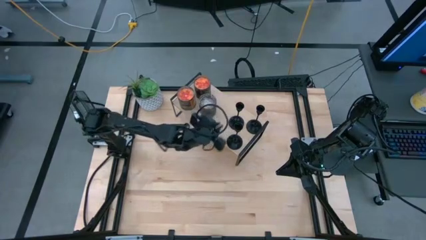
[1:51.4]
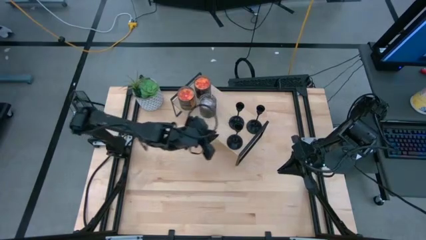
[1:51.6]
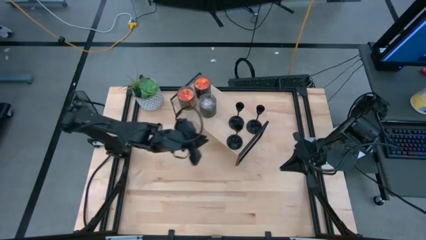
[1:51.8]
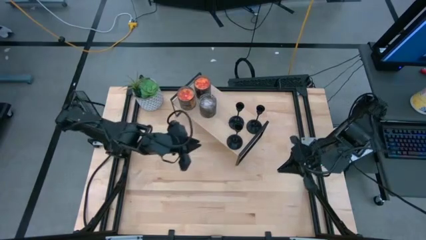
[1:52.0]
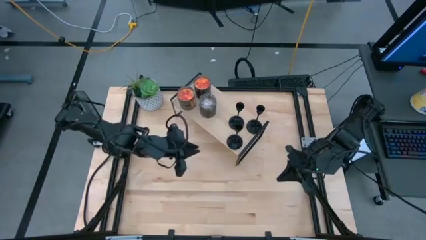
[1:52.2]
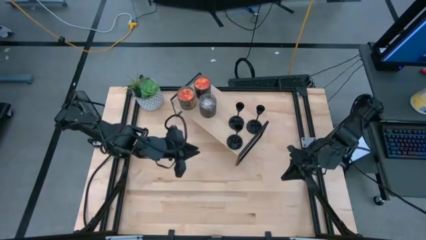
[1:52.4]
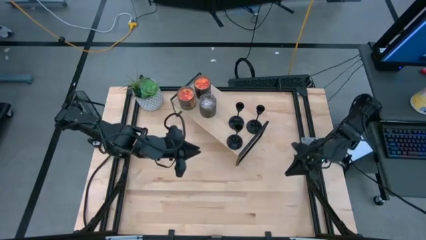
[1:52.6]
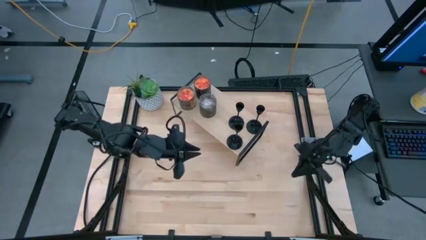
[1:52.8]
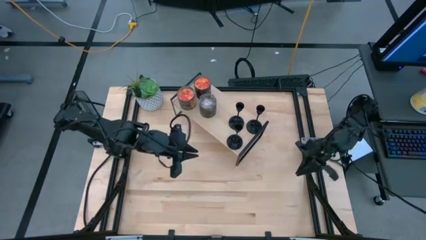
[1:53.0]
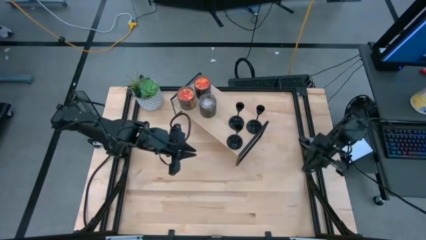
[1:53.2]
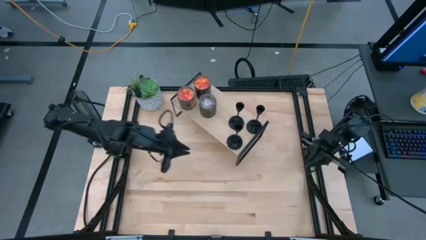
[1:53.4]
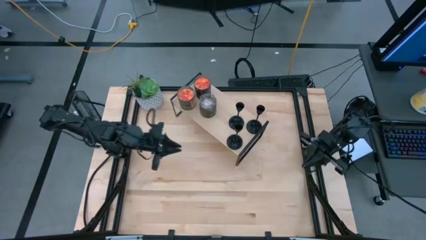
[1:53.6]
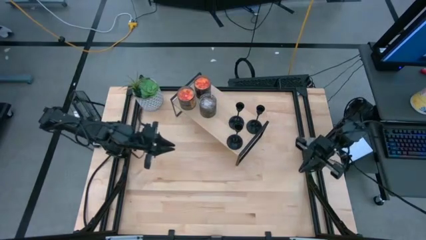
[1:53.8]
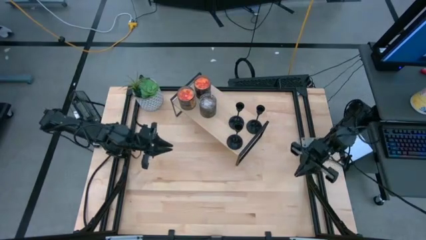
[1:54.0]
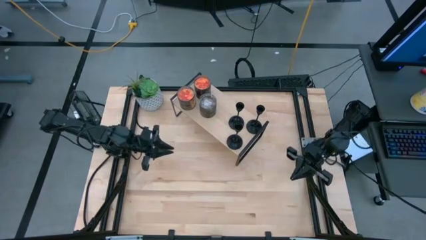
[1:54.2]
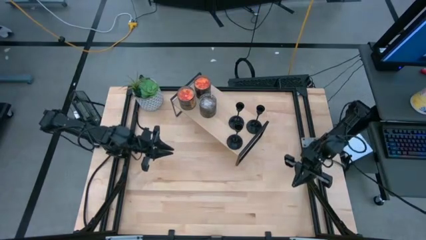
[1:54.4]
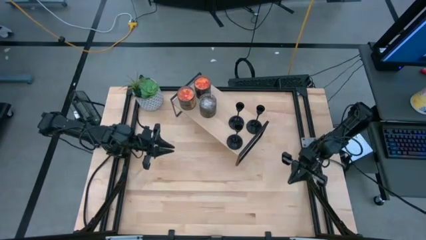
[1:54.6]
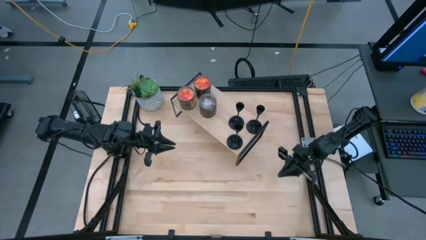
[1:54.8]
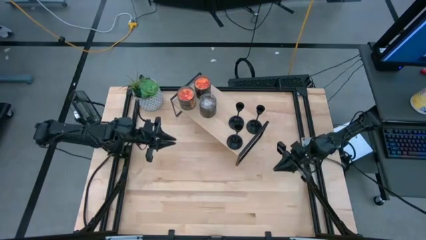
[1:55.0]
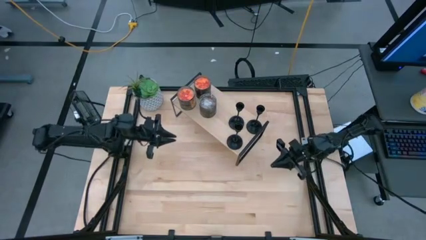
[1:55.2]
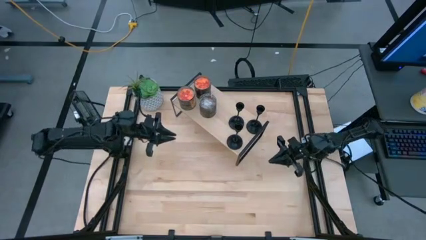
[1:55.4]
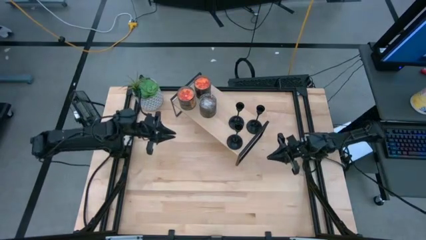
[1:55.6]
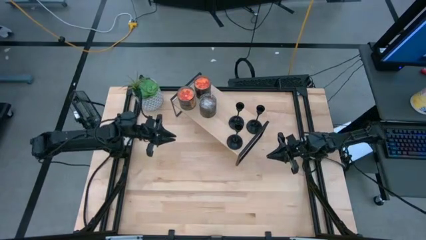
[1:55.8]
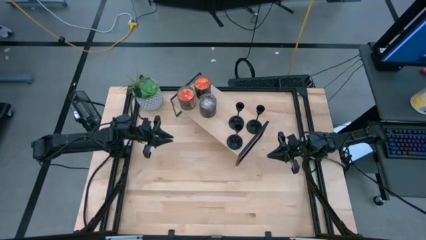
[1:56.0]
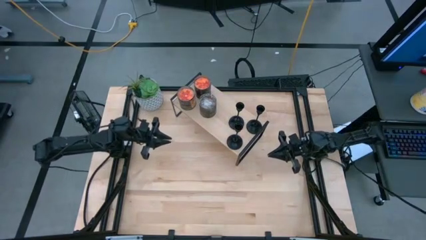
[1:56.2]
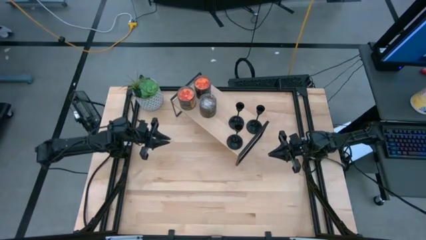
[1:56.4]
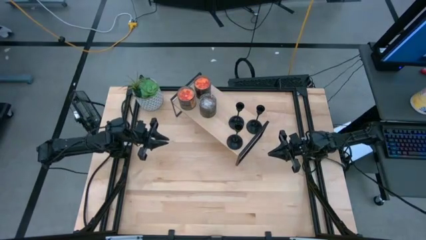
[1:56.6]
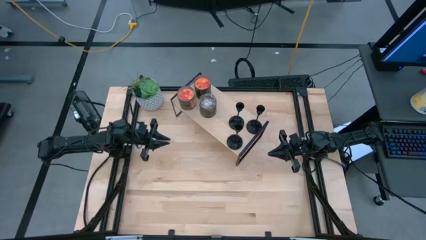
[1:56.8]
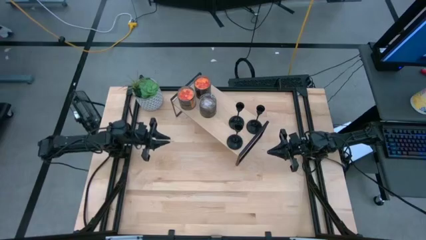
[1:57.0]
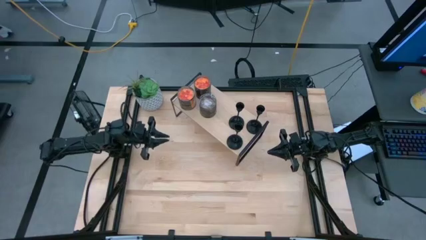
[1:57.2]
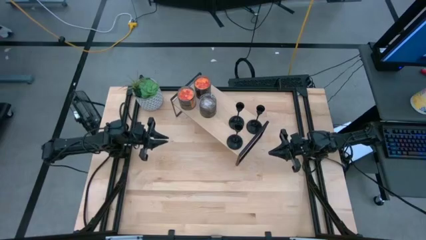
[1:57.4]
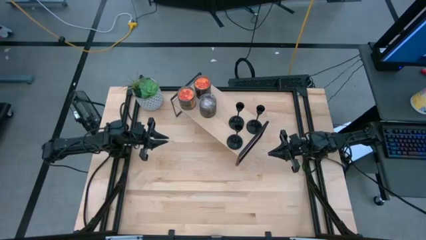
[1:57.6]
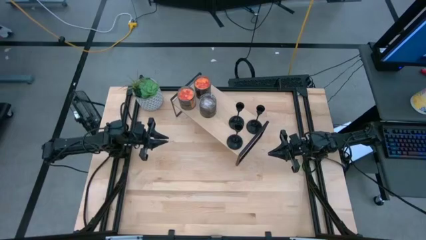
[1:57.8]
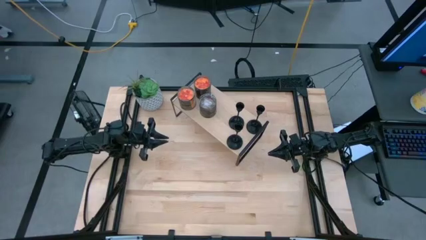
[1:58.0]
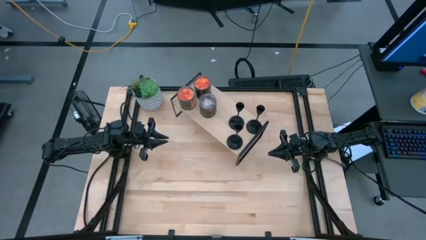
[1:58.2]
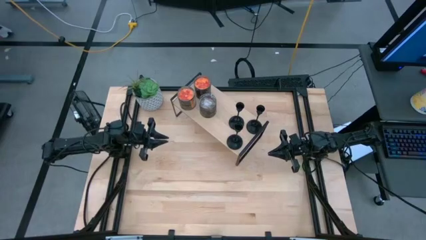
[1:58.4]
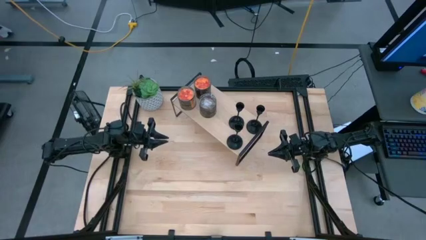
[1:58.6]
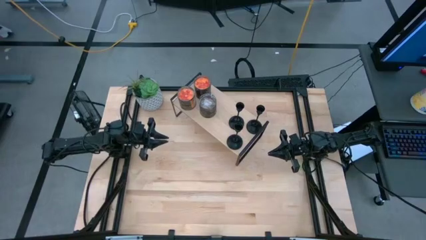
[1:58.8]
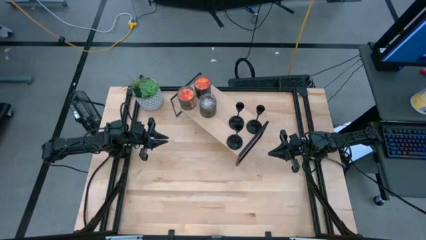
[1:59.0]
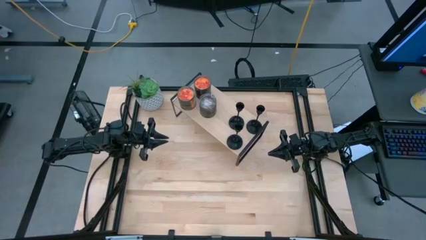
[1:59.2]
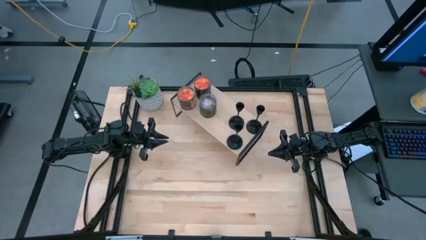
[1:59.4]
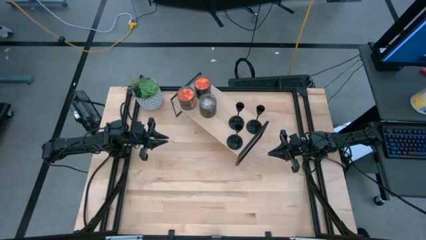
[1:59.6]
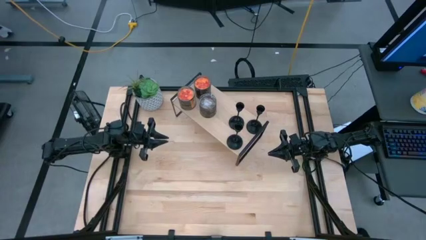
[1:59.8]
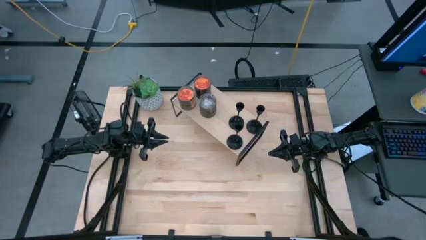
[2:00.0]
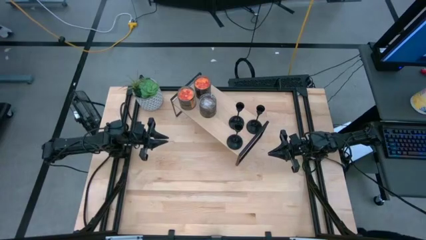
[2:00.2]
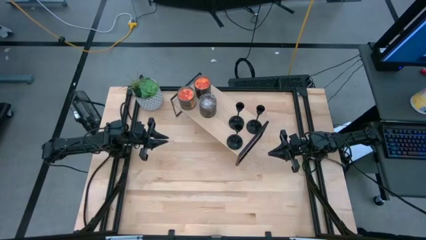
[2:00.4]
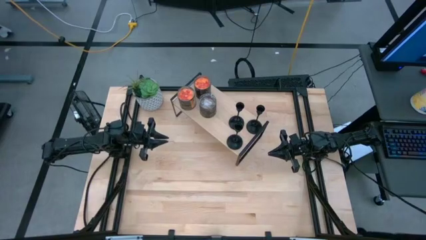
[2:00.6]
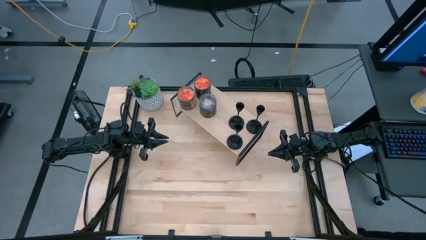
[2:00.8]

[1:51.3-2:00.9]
Task: Pick & Place candle stick holders
Return to Home Position
